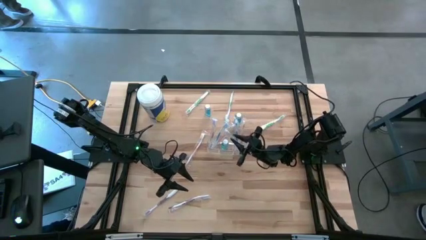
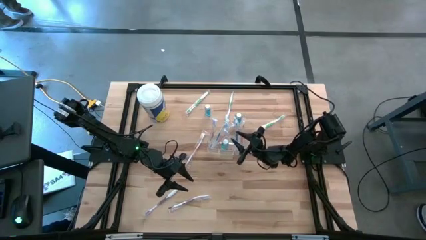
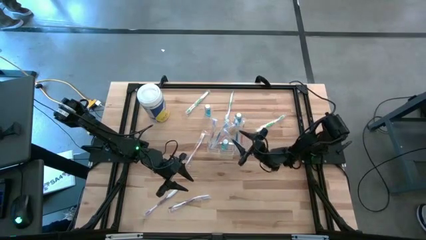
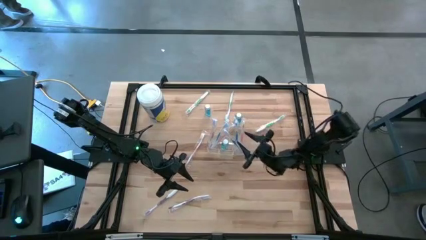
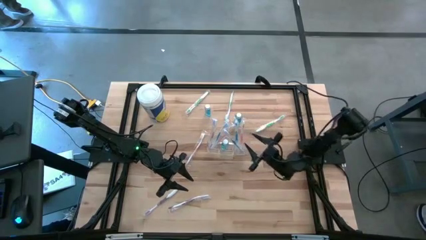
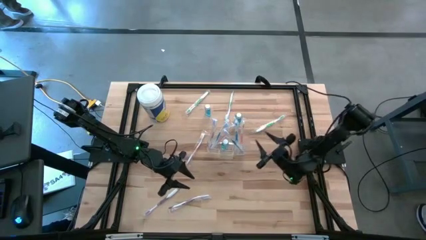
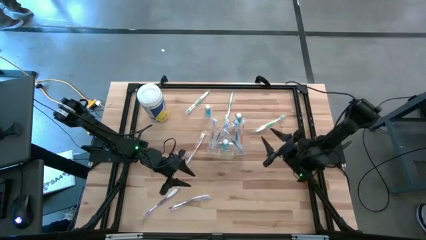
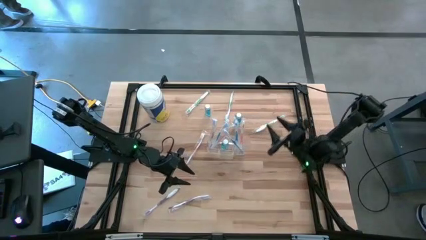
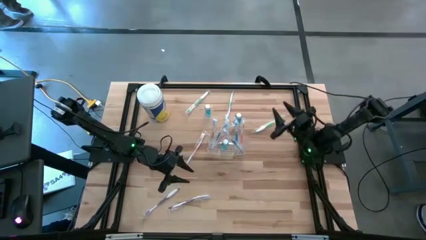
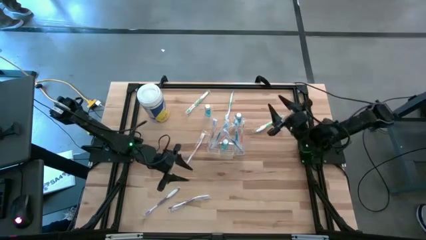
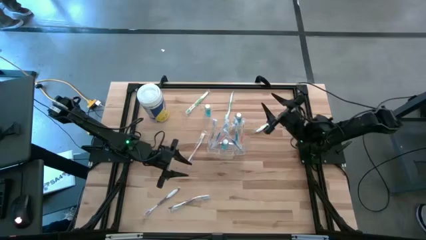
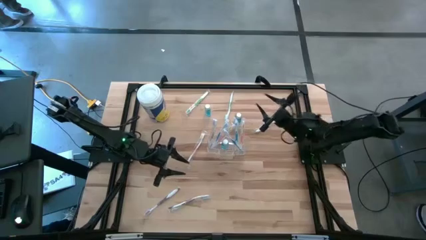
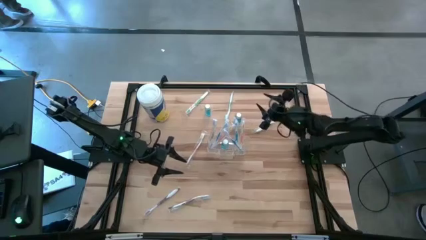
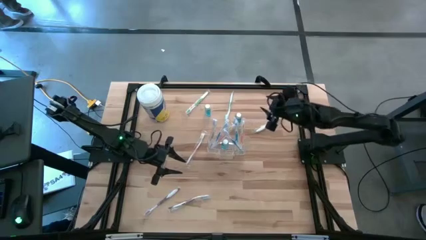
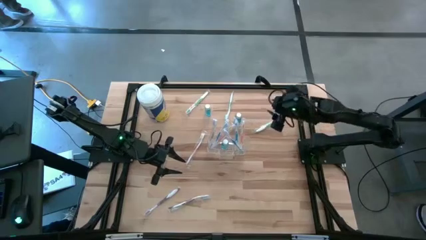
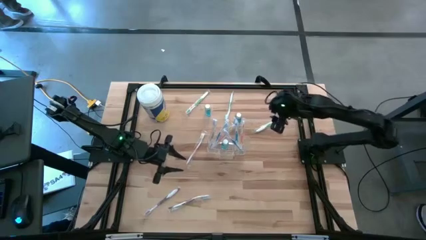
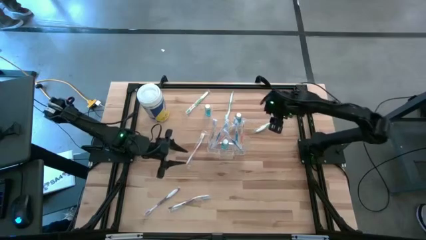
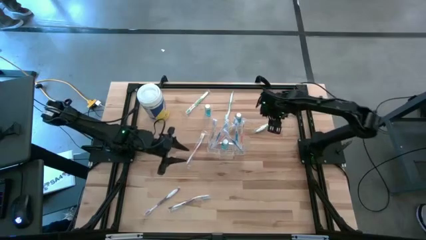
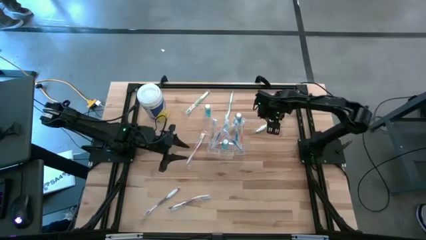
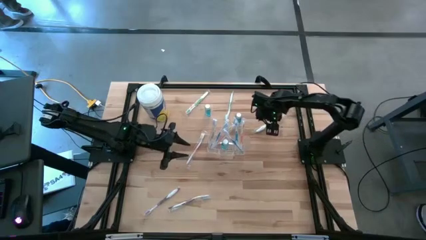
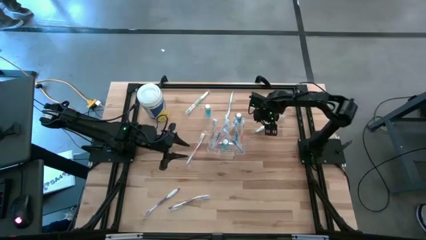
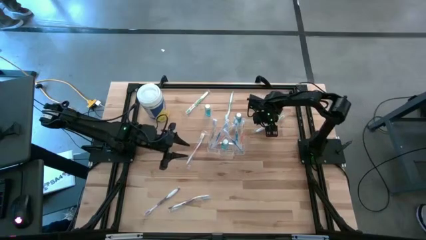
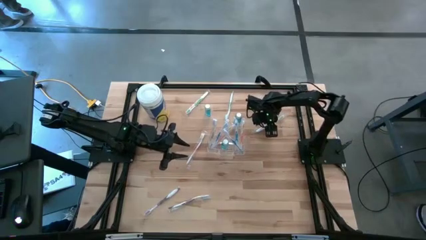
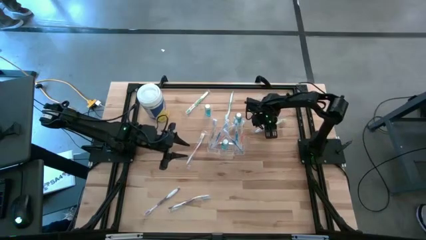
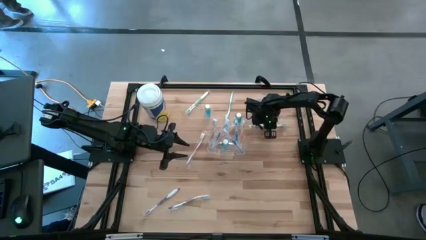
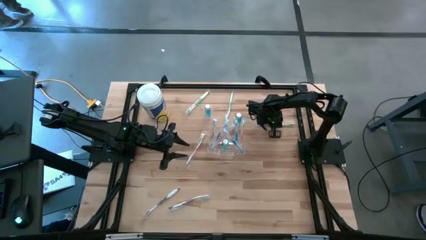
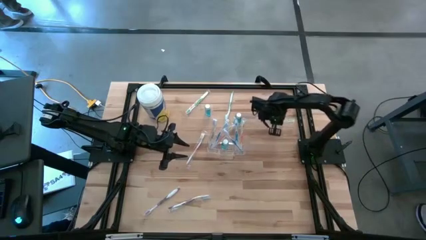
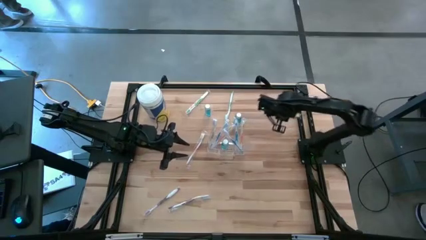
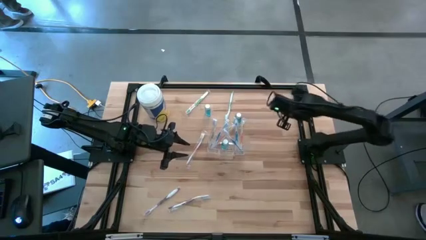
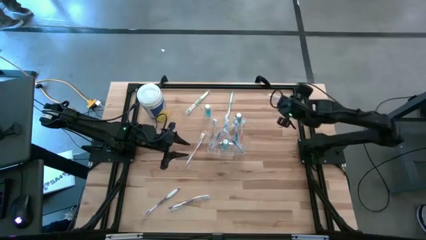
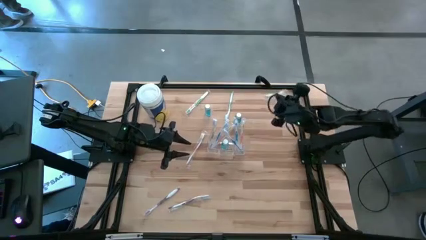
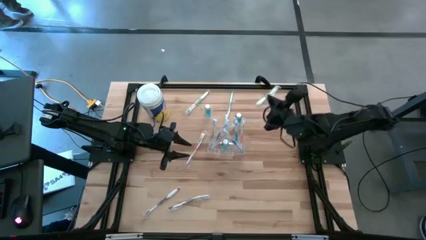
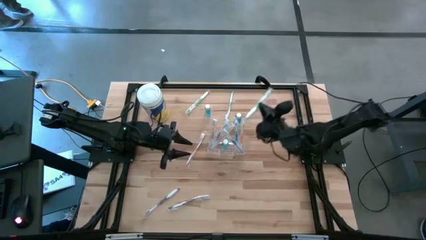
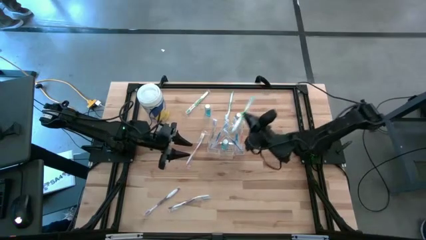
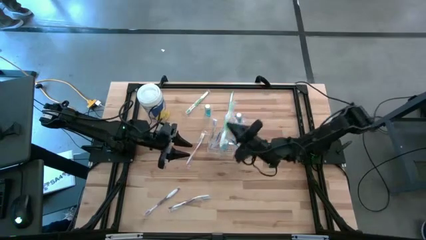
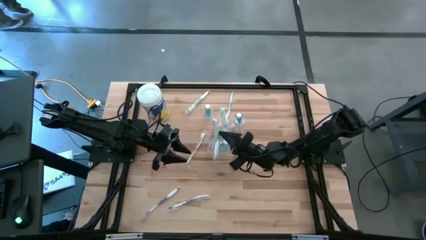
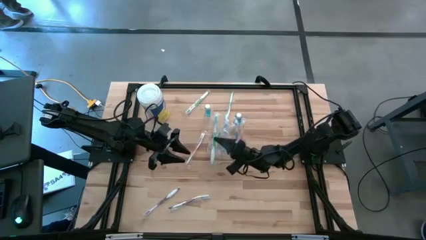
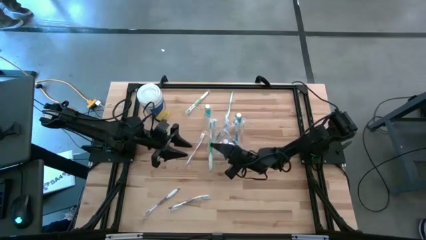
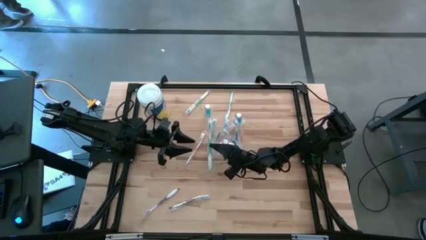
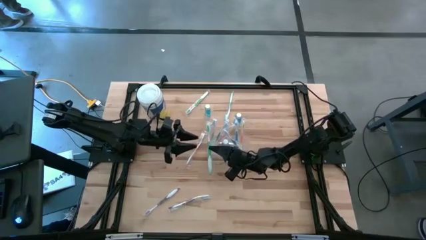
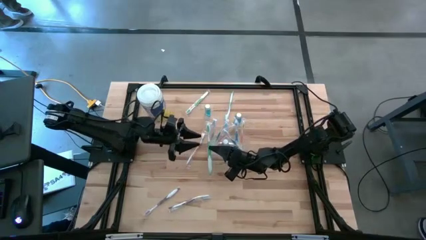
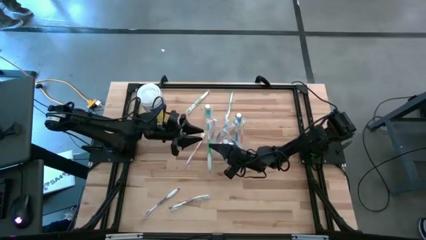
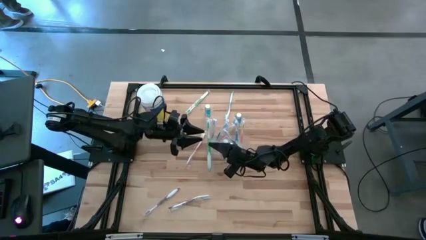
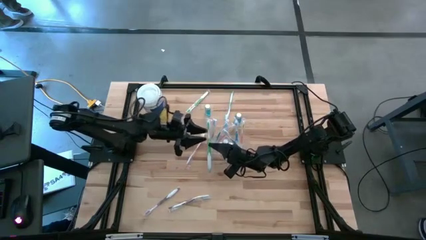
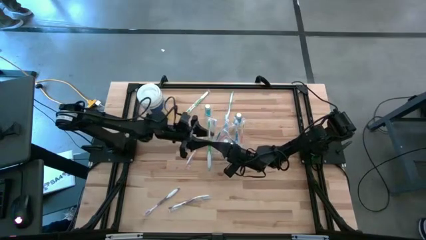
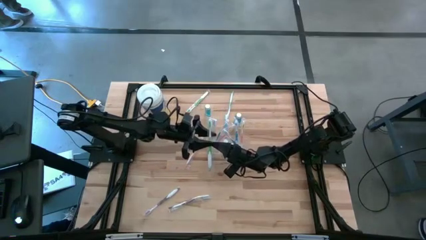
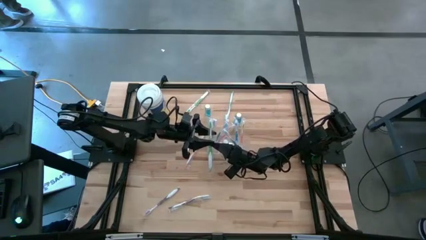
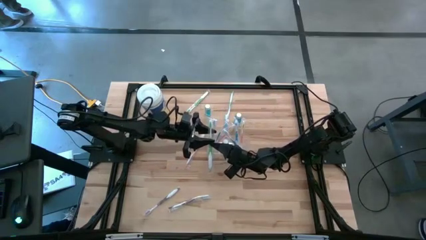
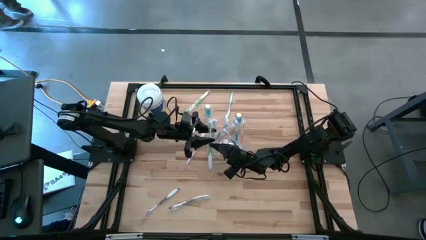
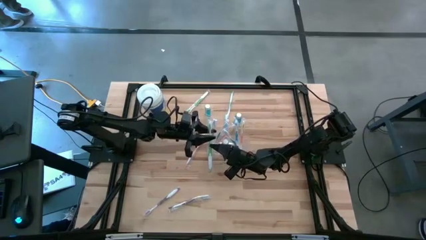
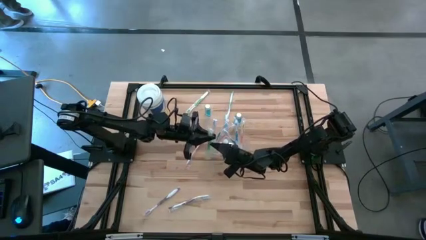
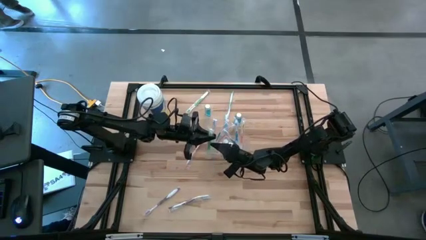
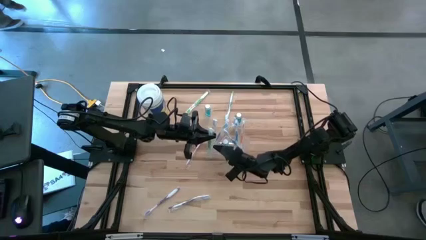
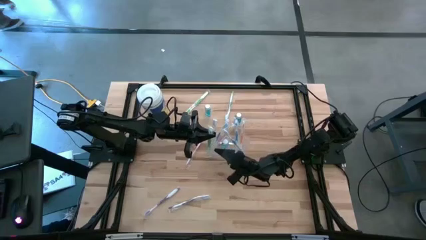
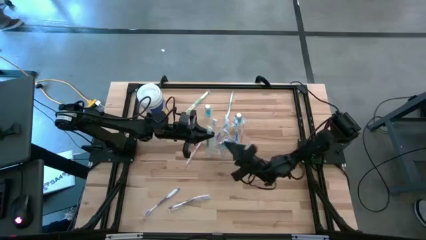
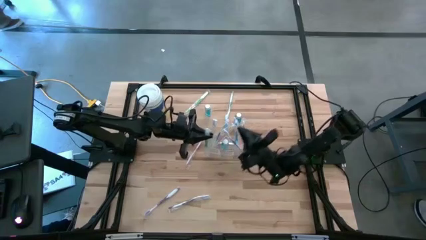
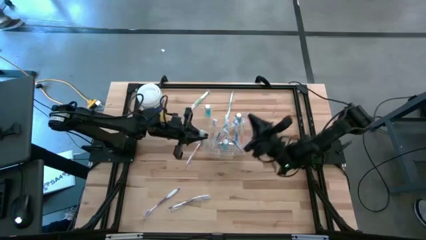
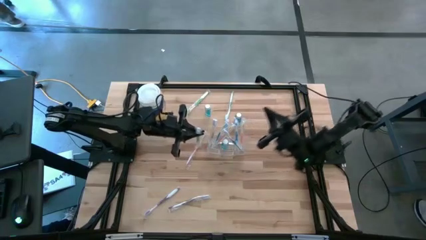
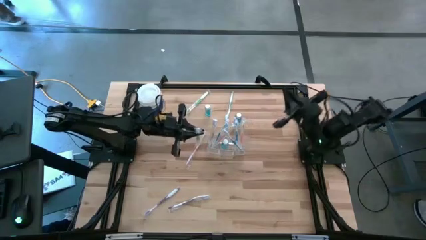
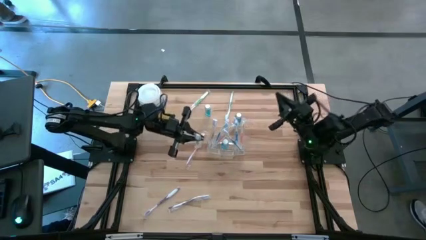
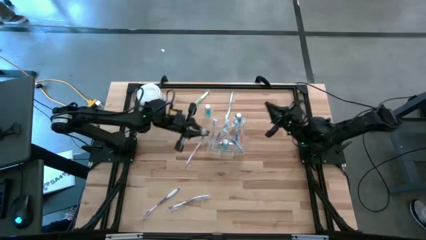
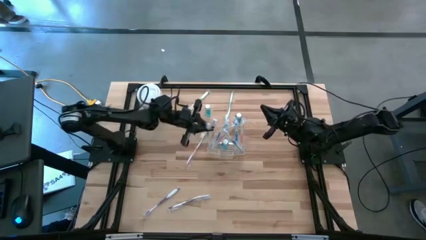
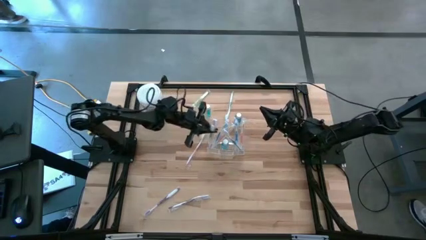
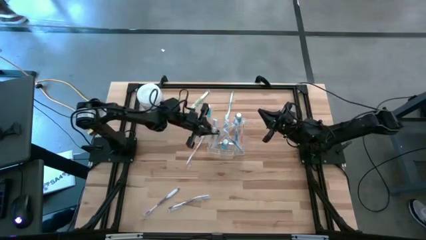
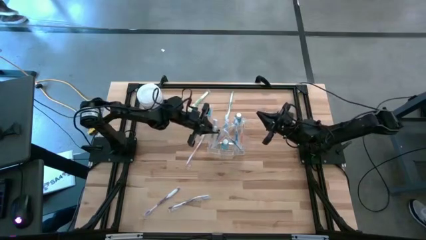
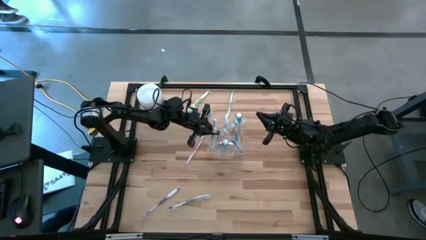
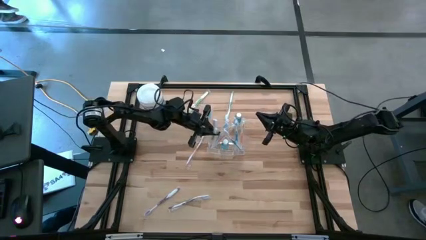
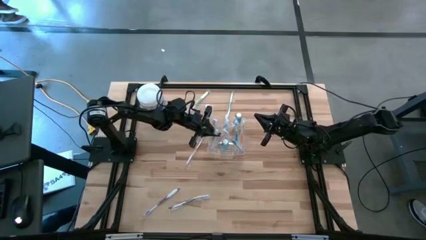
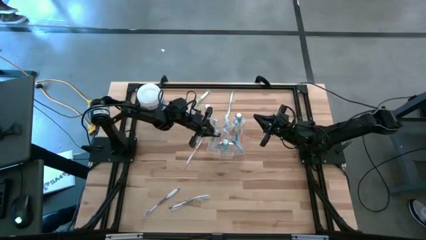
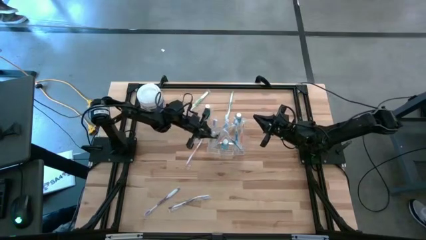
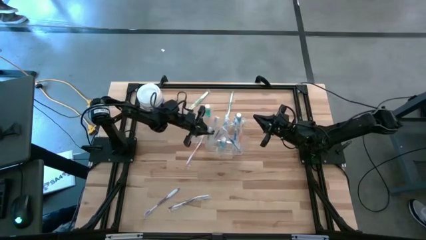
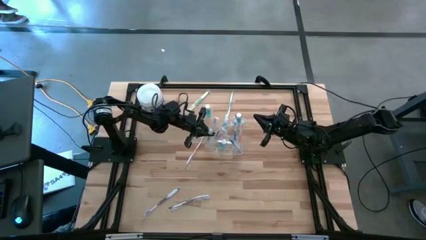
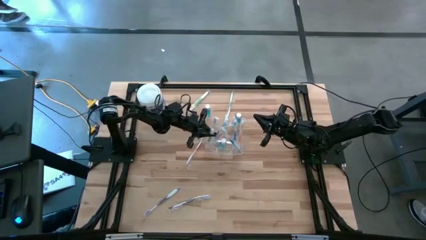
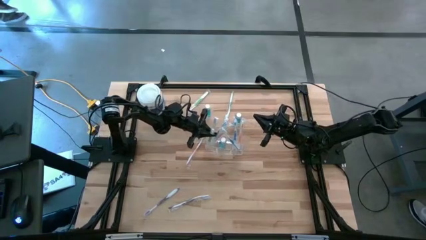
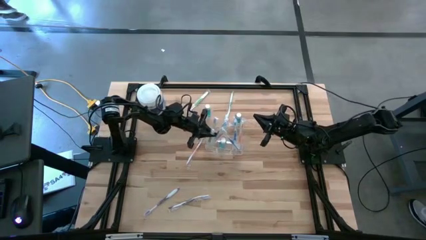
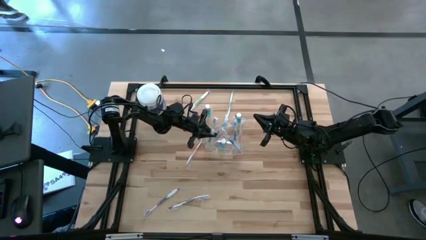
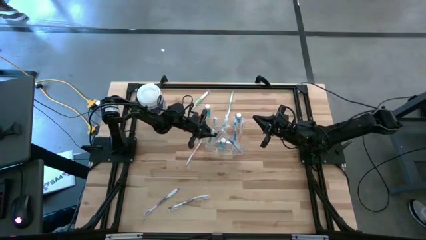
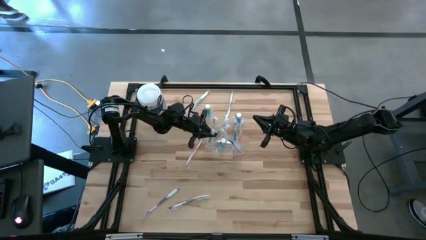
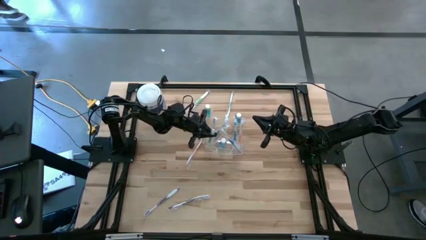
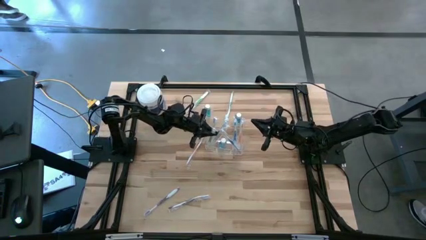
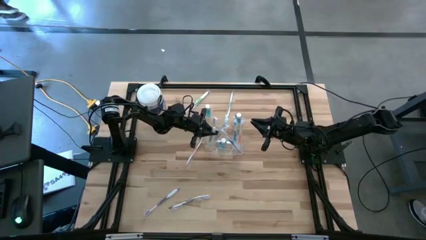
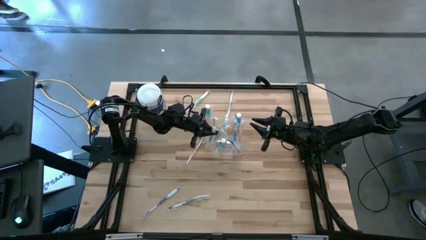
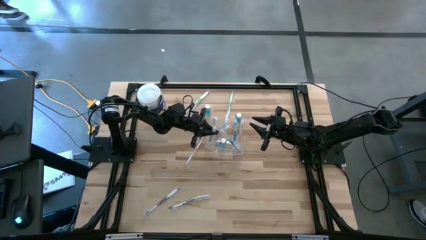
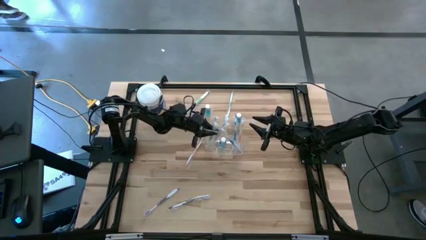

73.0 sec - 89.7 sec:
Task: Pick & Place toothbrushing station
Put the right green toothbrush into the left section of the transparent organizer
